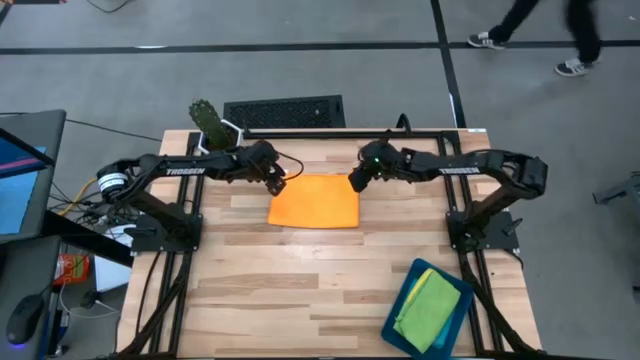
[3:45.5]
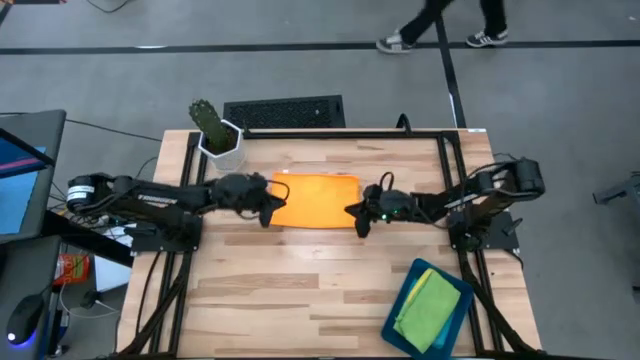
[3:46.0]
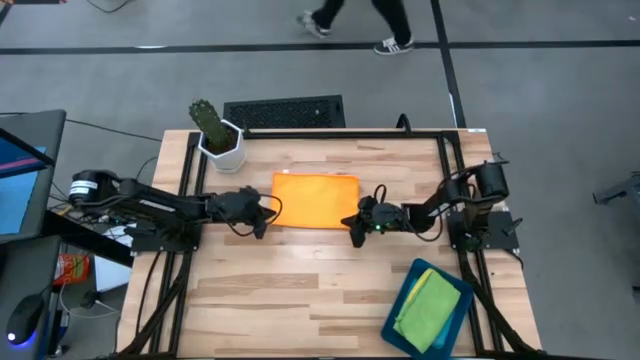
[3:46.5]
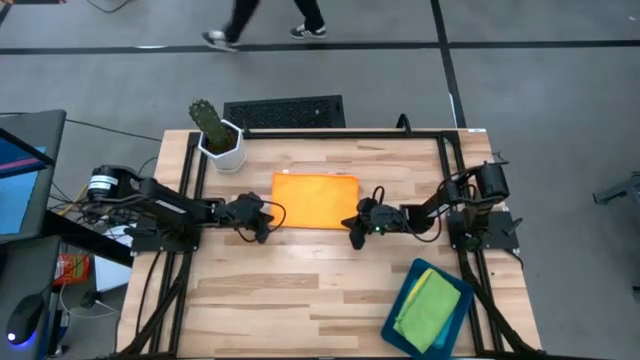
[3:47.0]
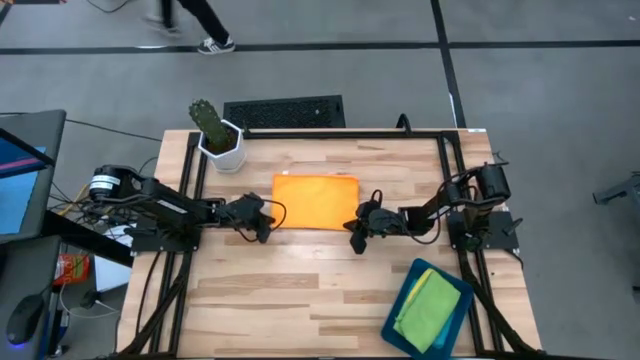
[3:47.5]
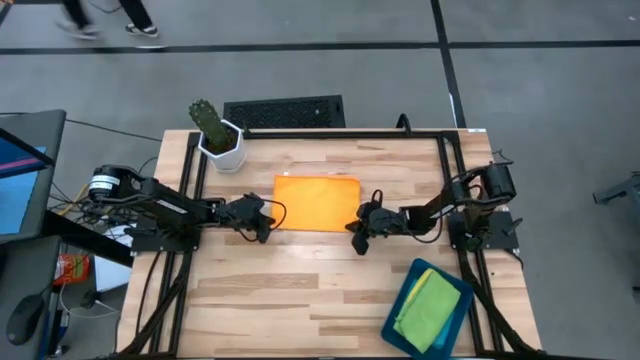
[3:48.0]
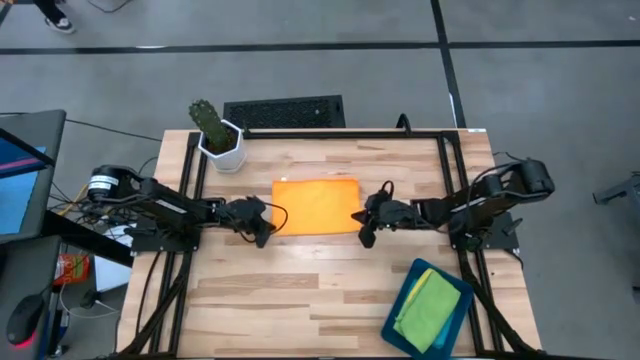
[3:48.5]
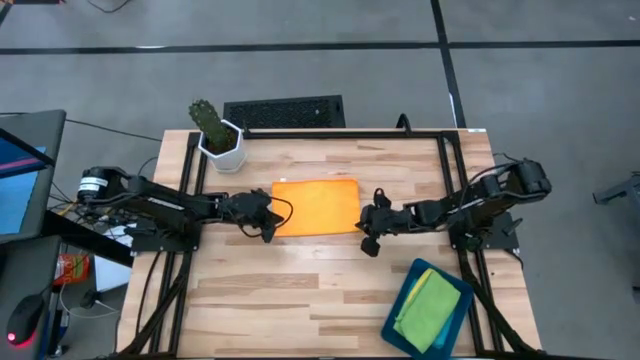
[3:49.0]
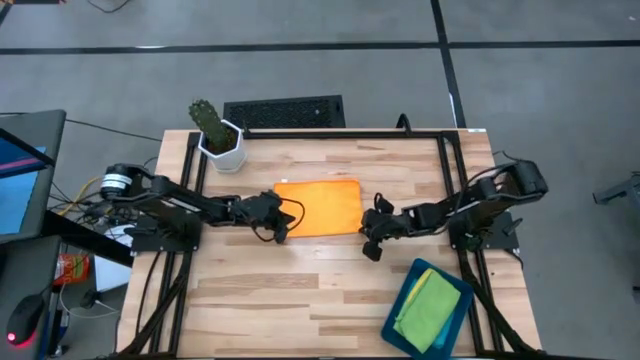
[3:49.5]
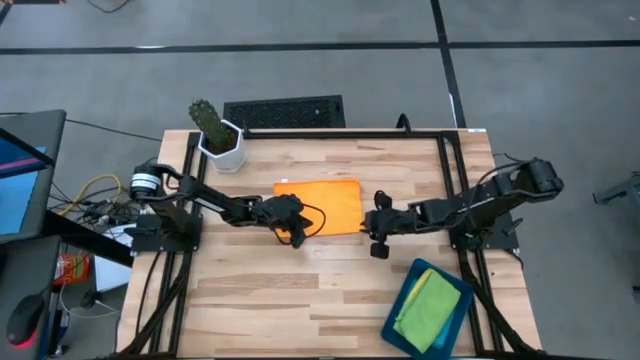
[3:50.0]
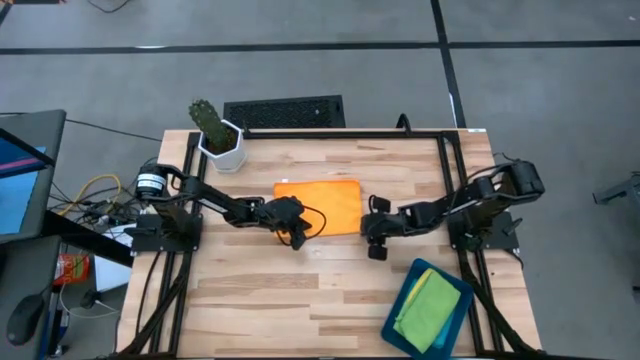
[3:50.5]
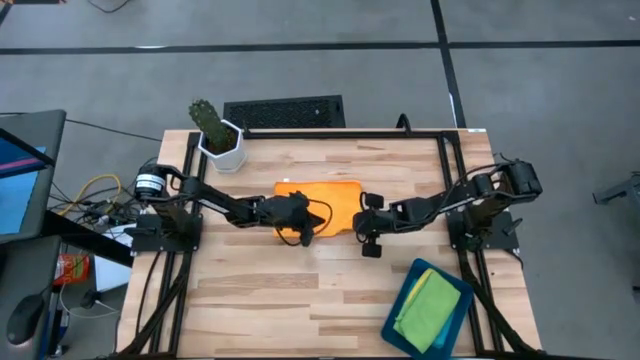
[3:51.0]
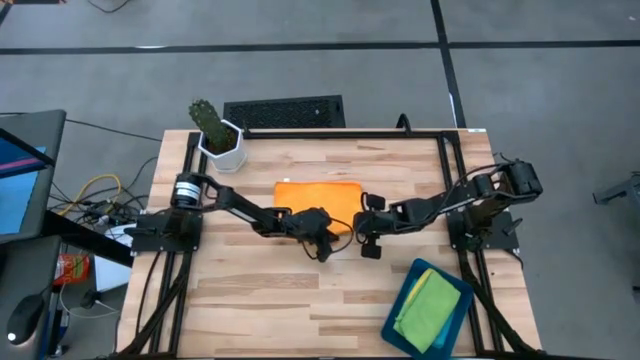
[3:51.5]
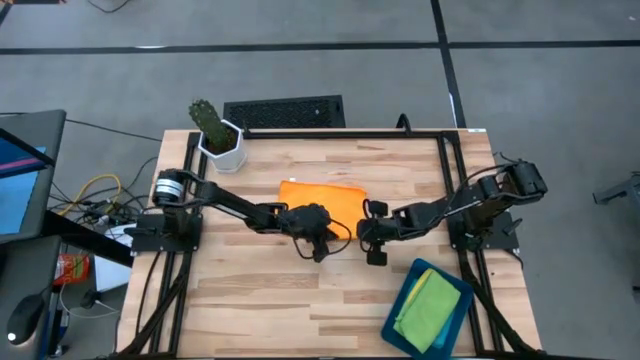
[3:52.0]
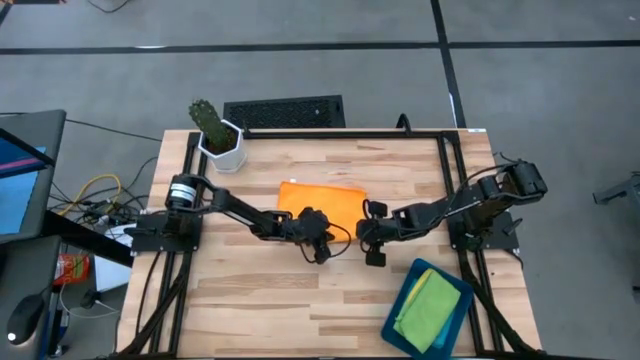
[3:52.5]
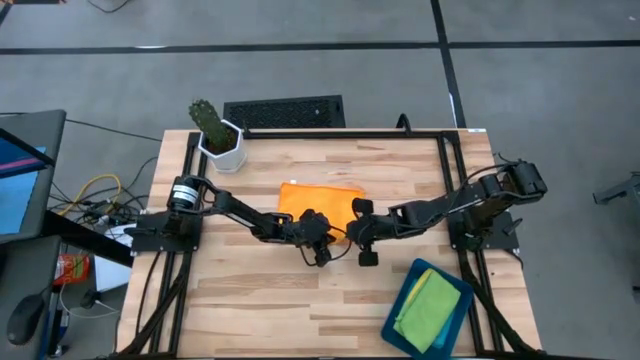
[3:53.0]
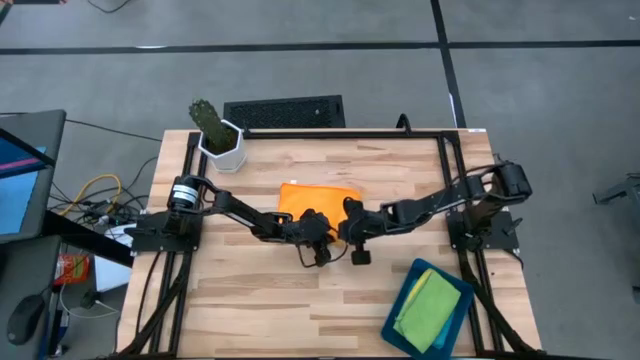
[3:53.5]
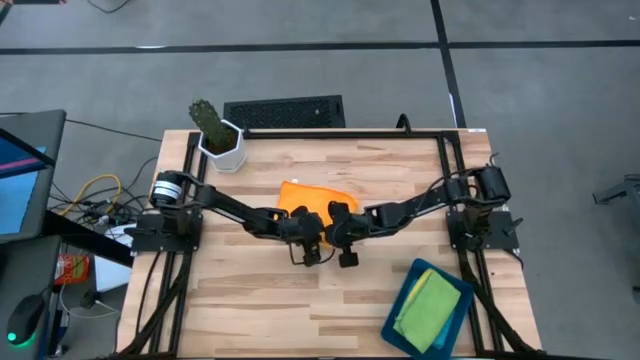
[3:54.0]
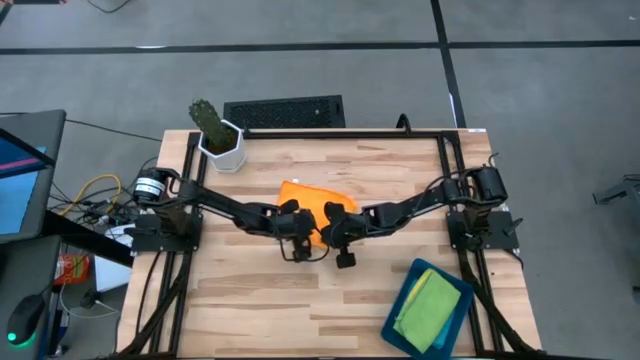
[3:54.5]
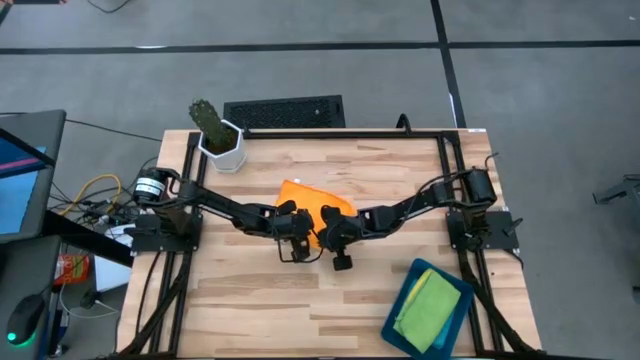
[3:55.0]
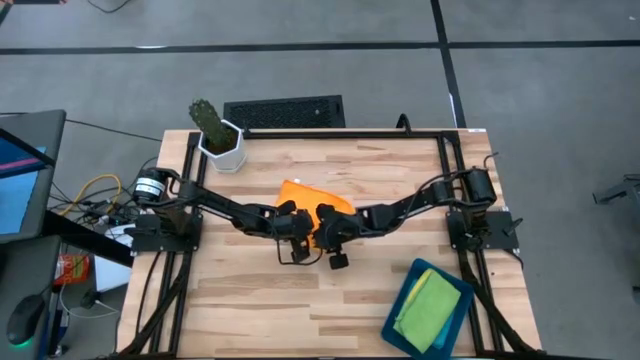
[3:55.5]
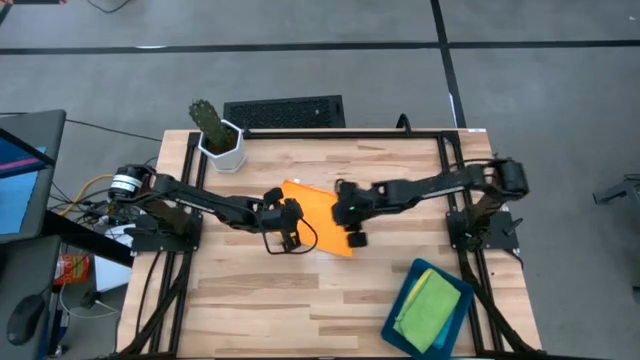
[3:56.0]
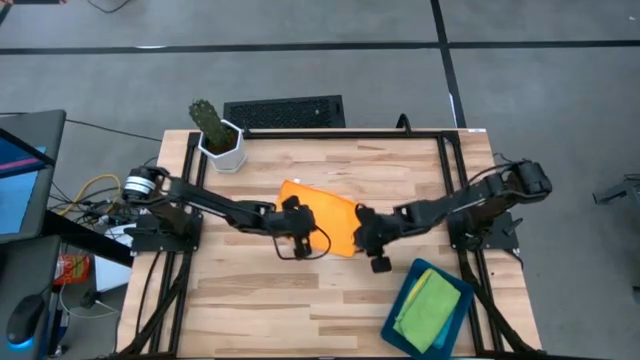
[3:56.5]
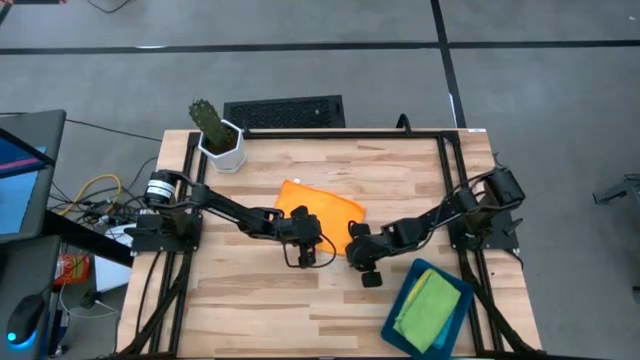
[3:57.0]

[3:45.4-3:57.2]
Task: Fold microfiber towels
Fold the orange microfiber towel

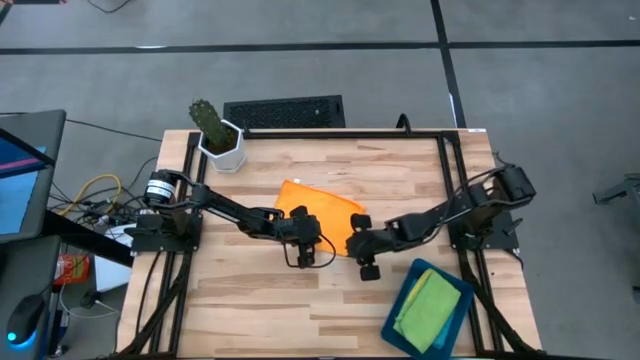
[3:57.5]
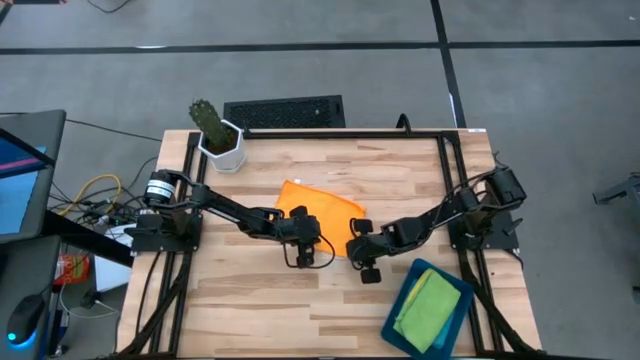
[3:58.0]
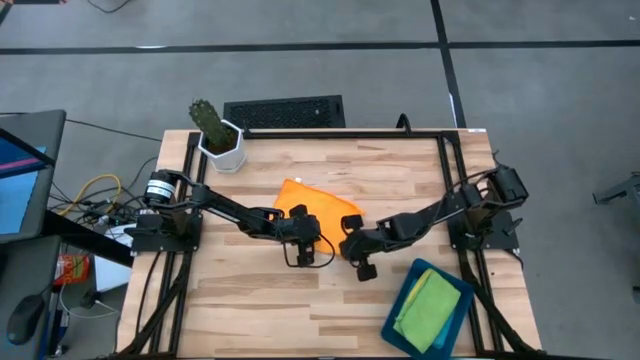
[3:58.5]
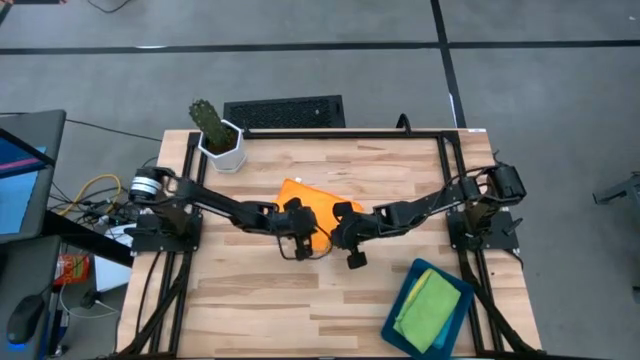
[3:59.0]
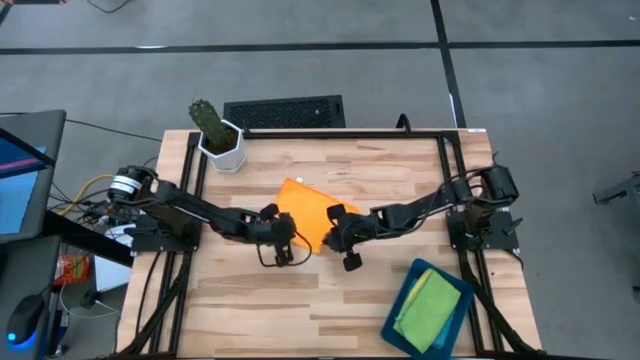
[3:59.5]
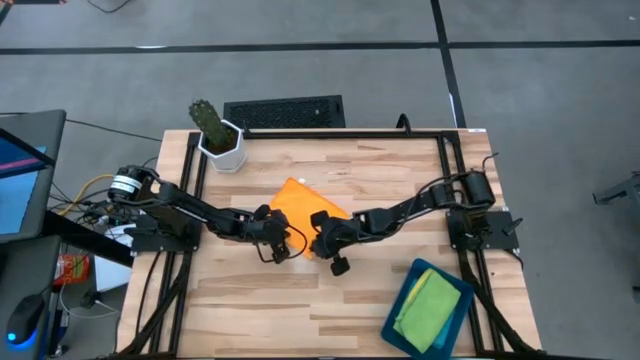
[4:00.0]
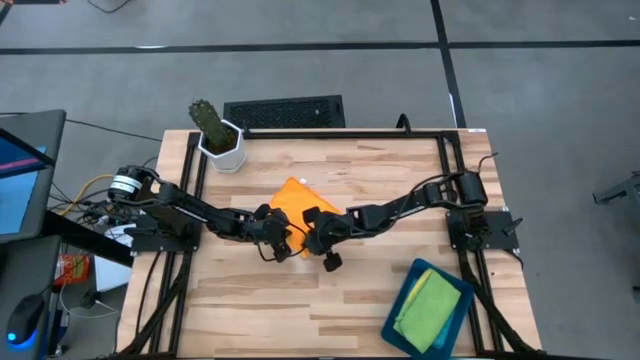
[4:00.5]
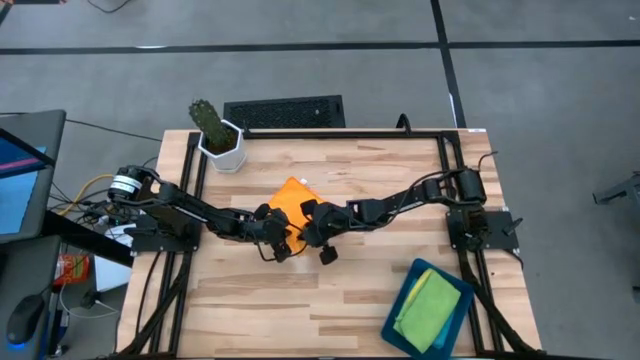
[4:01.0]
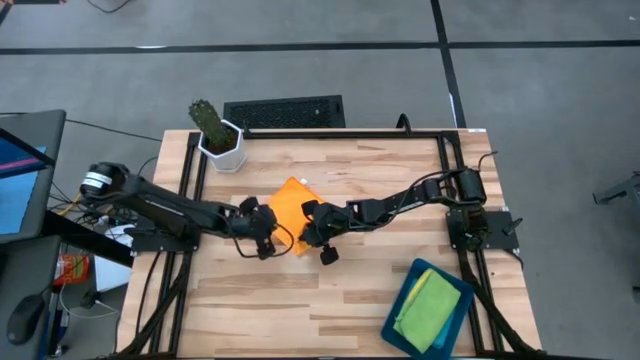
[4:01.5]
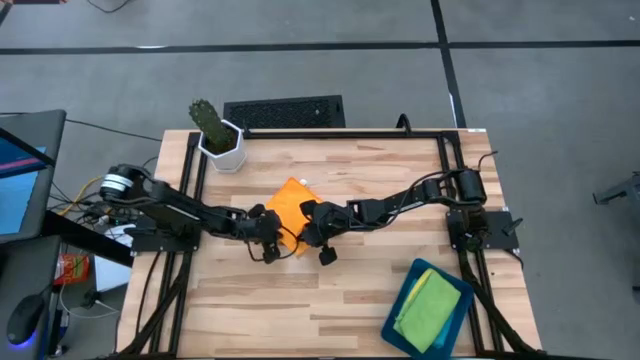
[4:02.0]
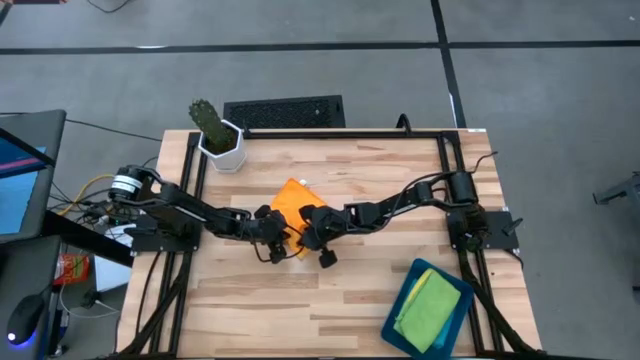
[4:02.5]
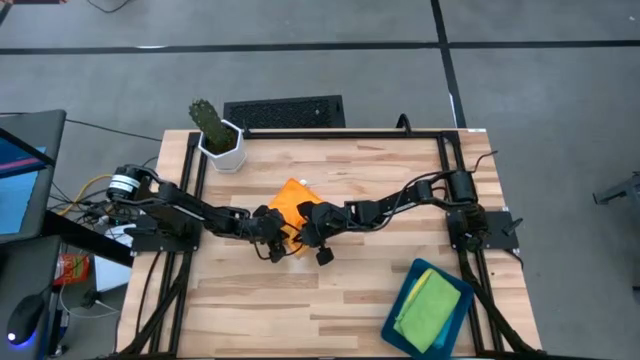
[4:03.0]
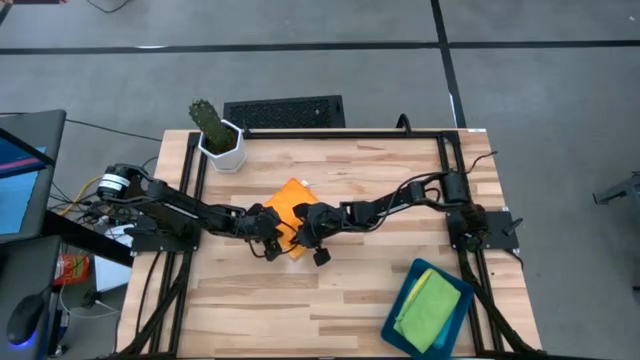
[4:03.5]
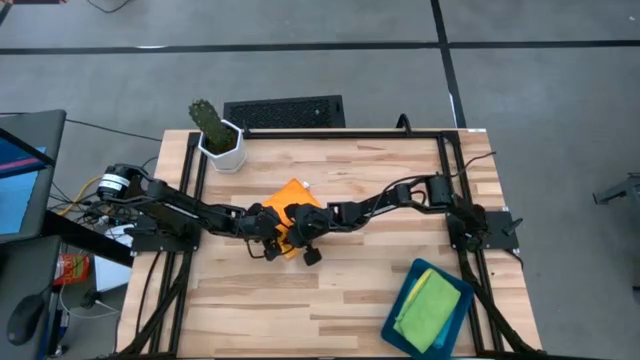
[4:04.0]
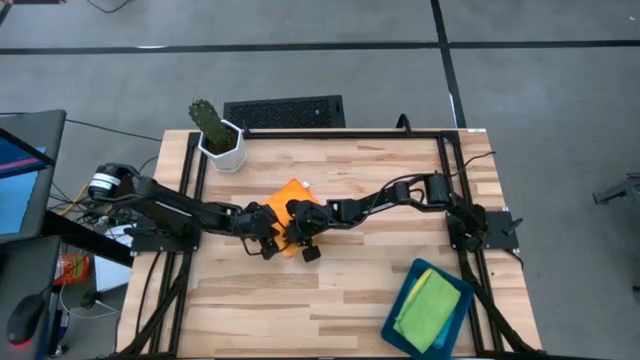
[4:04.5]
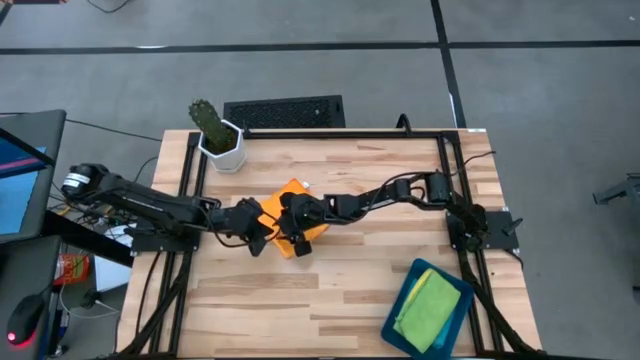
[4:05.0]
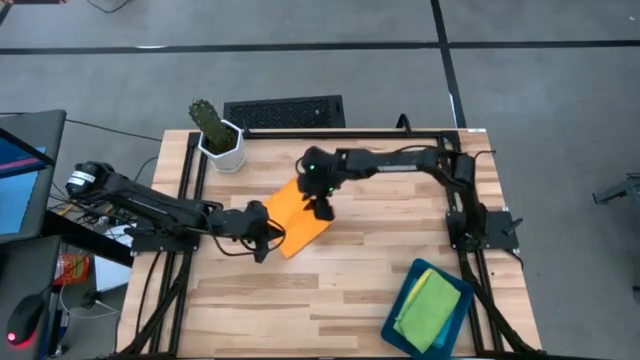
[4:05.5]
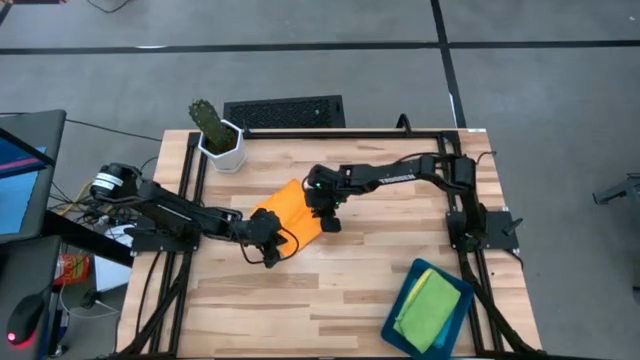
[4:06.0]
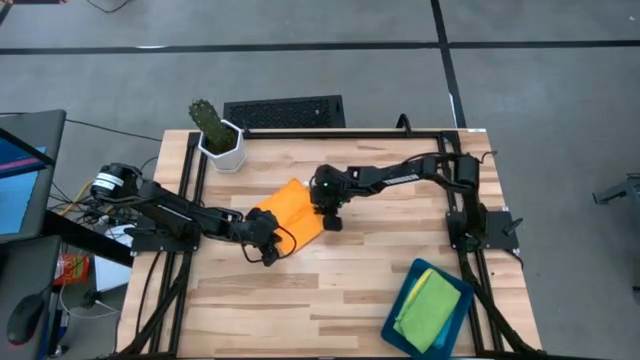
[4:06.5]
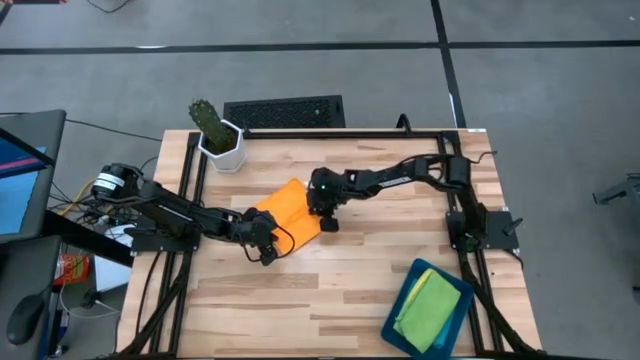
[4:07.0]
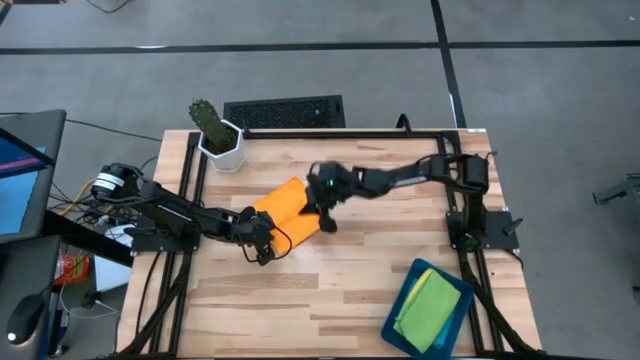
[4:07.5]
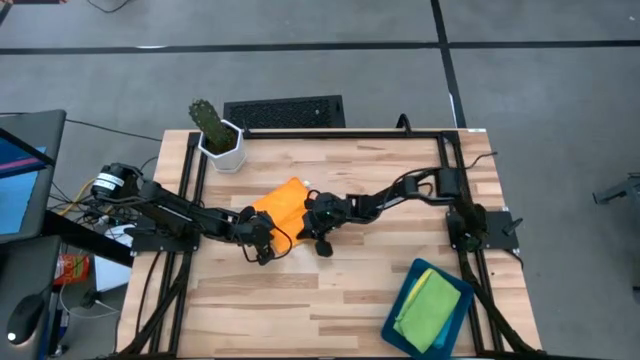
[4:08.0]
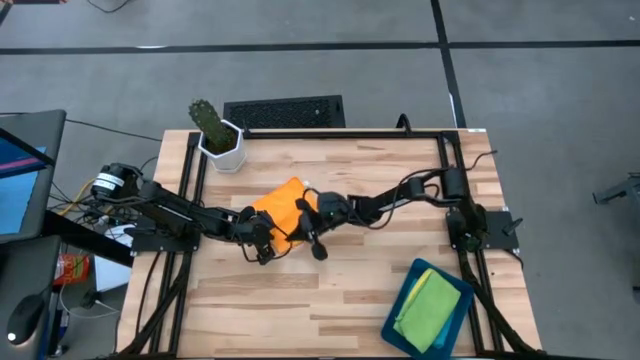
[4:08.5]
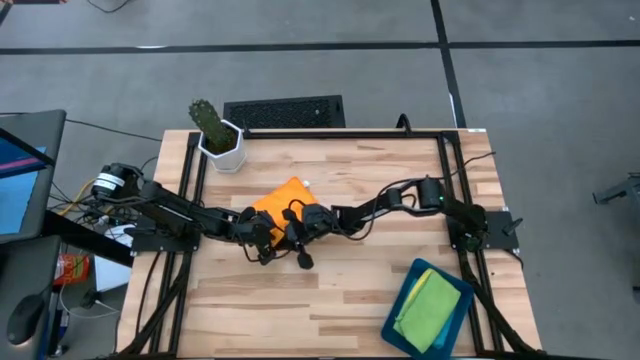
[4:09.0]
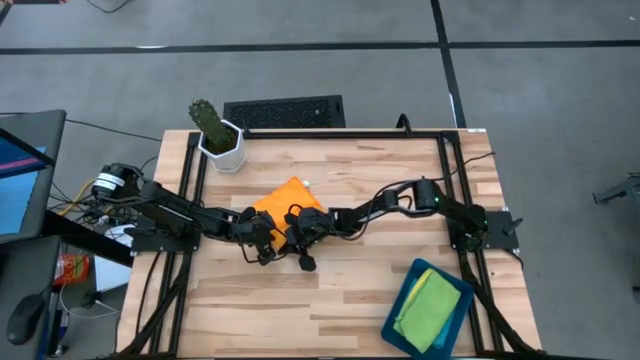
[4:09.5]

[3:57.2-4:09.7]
Fold the orange microfiber towel
